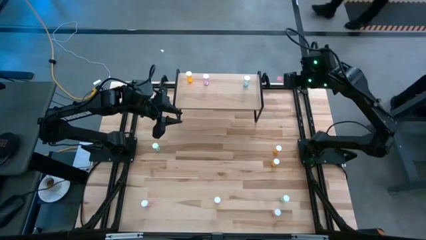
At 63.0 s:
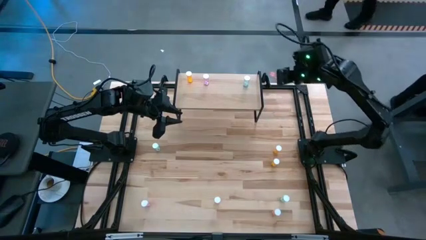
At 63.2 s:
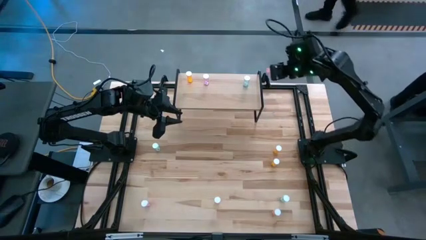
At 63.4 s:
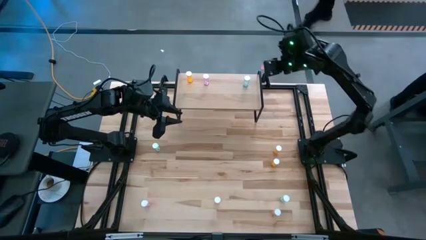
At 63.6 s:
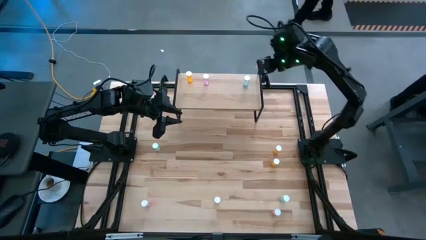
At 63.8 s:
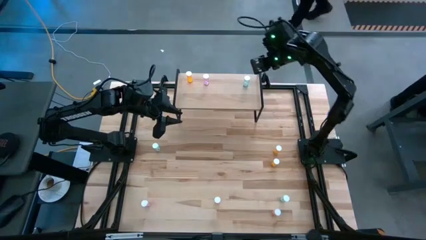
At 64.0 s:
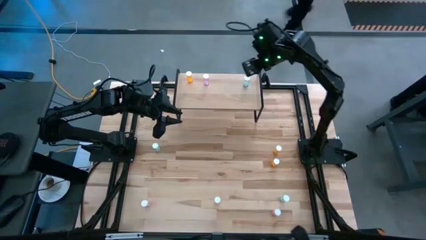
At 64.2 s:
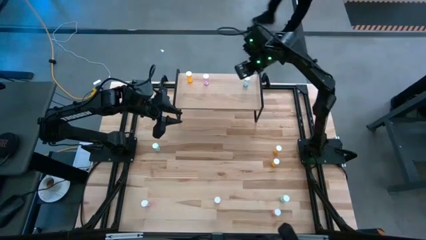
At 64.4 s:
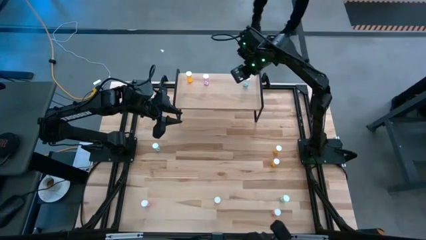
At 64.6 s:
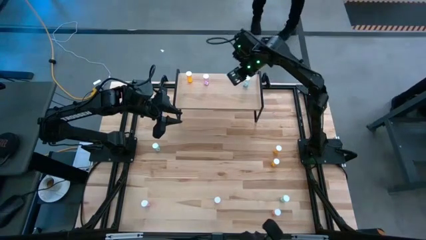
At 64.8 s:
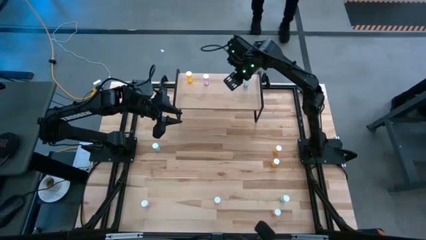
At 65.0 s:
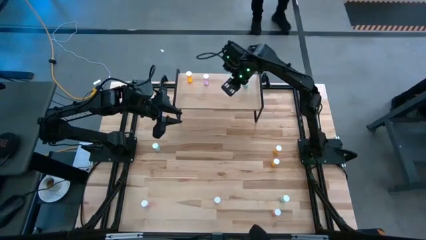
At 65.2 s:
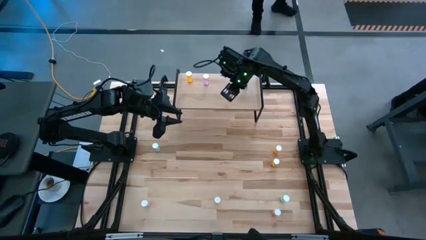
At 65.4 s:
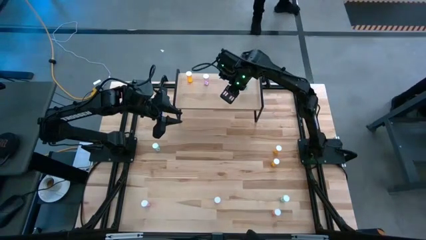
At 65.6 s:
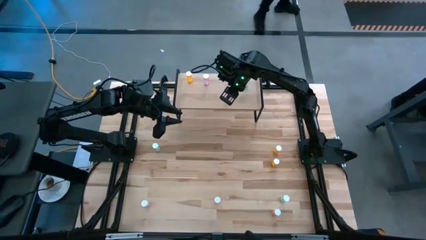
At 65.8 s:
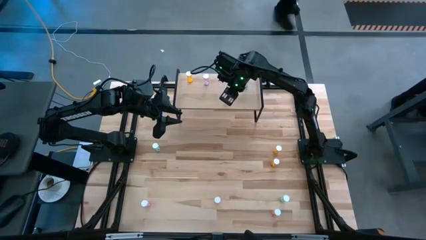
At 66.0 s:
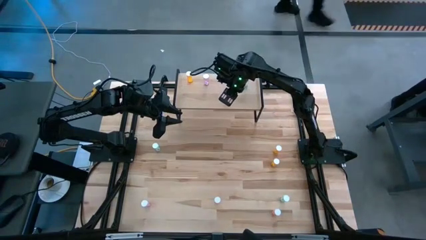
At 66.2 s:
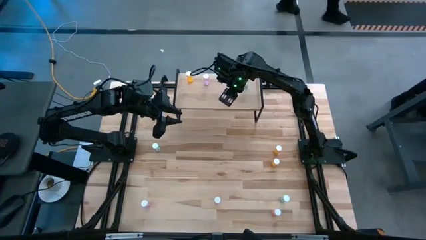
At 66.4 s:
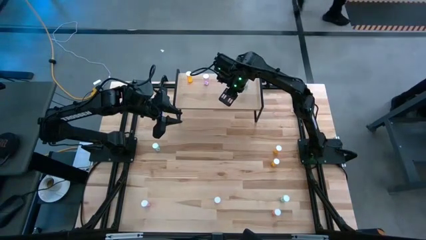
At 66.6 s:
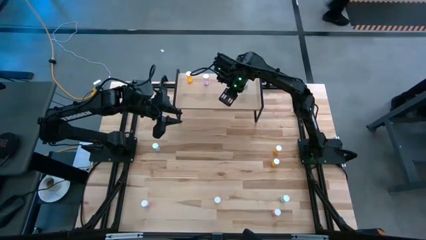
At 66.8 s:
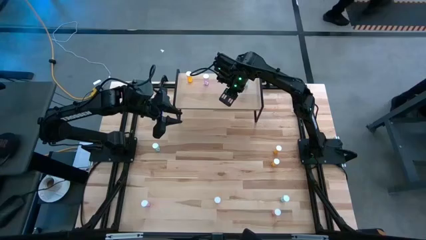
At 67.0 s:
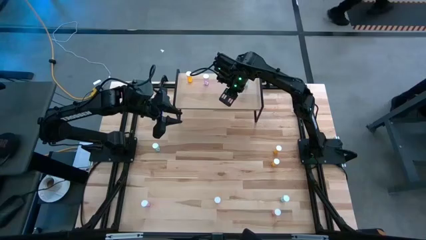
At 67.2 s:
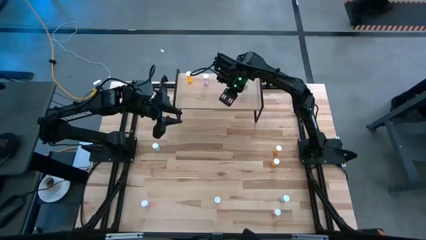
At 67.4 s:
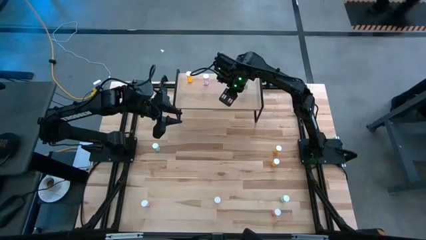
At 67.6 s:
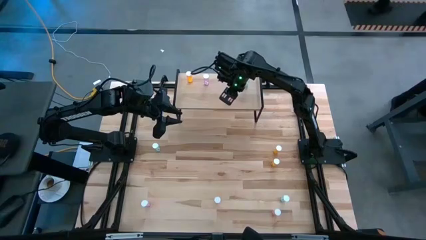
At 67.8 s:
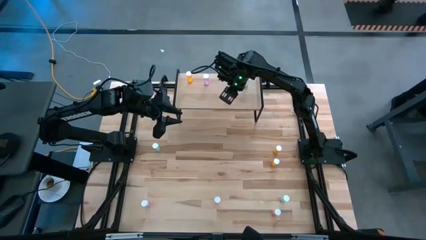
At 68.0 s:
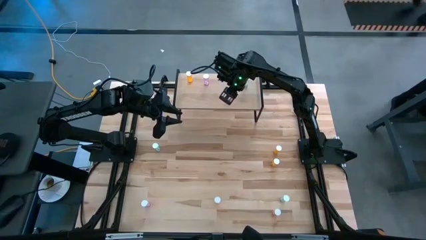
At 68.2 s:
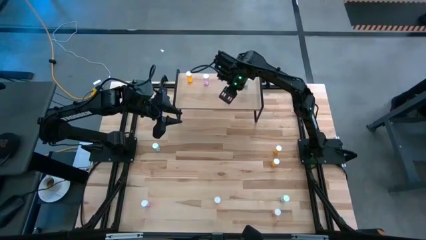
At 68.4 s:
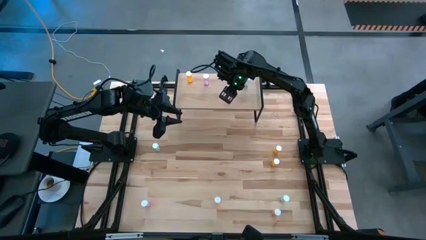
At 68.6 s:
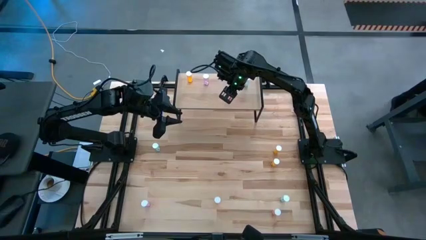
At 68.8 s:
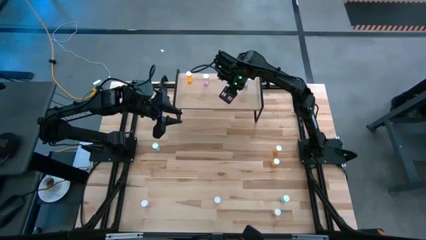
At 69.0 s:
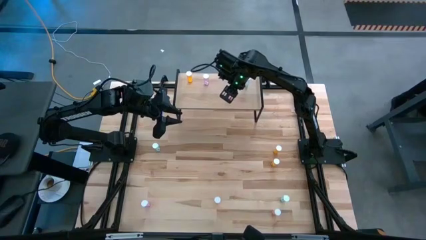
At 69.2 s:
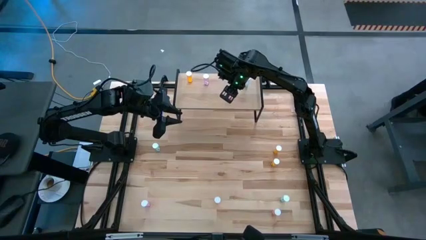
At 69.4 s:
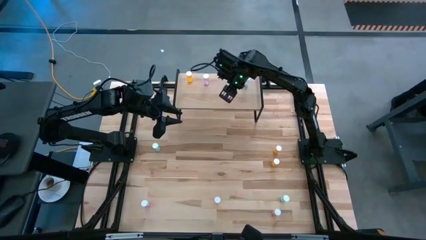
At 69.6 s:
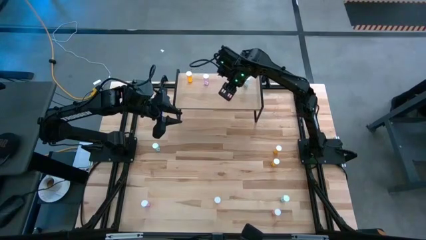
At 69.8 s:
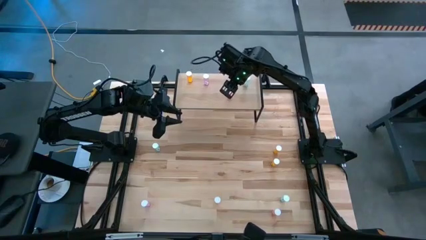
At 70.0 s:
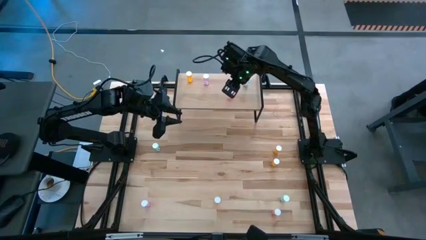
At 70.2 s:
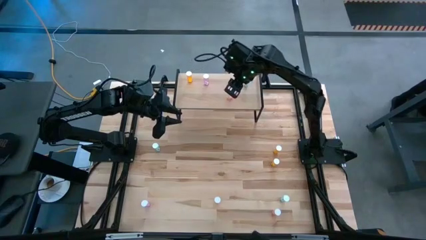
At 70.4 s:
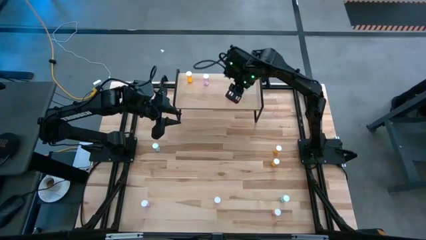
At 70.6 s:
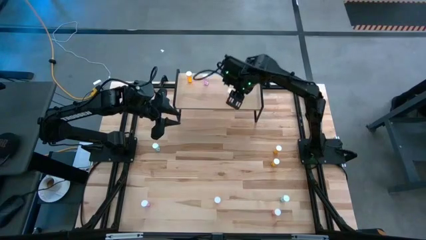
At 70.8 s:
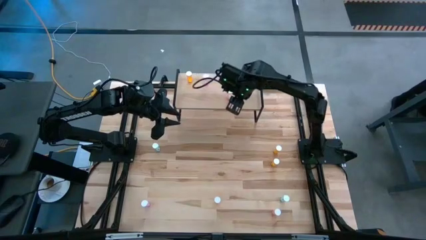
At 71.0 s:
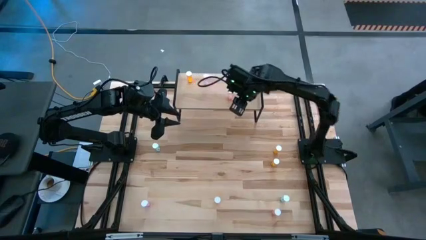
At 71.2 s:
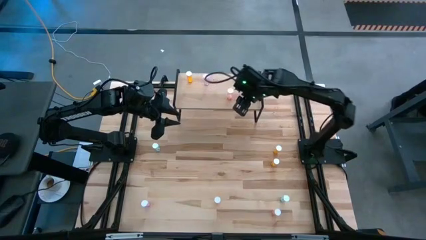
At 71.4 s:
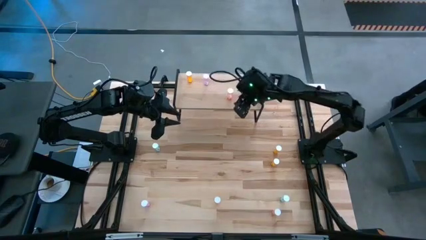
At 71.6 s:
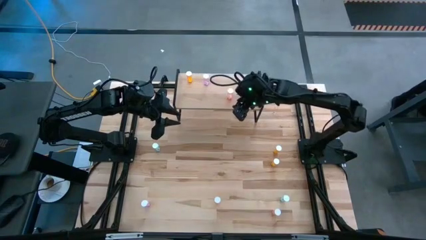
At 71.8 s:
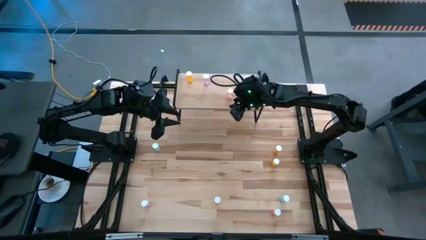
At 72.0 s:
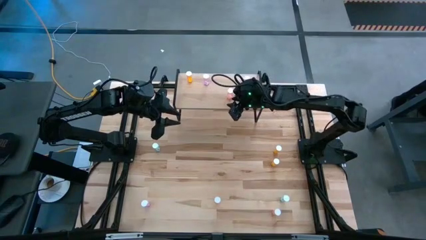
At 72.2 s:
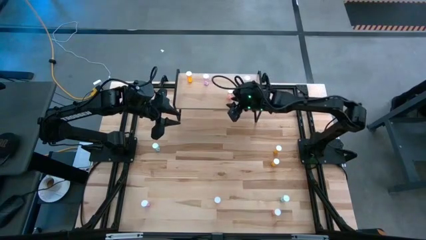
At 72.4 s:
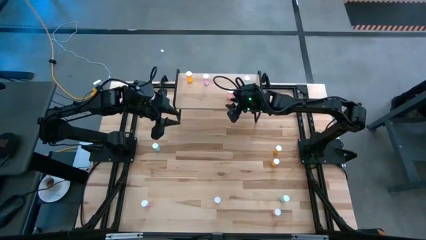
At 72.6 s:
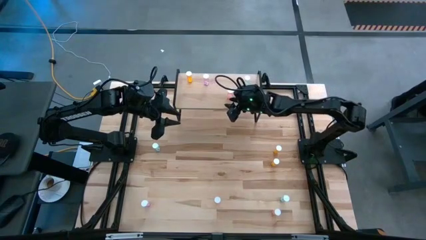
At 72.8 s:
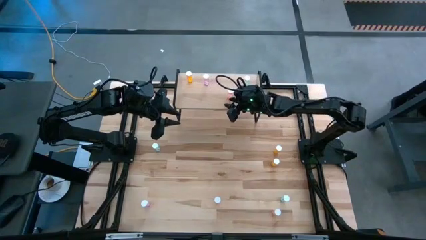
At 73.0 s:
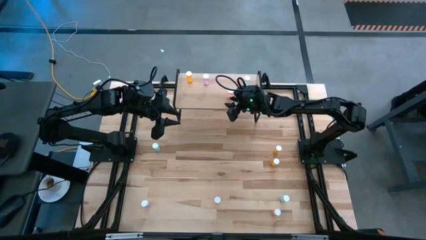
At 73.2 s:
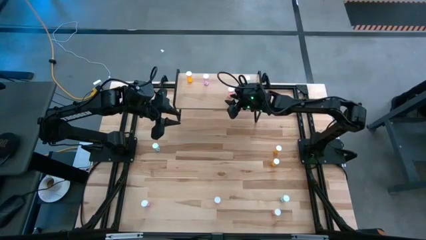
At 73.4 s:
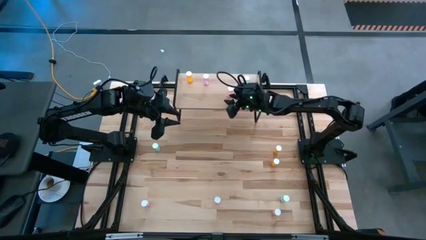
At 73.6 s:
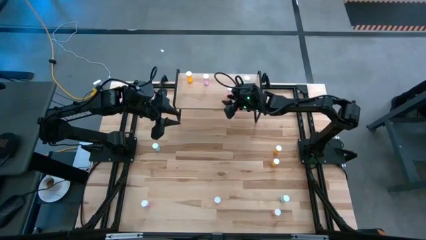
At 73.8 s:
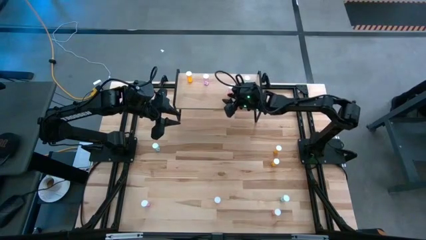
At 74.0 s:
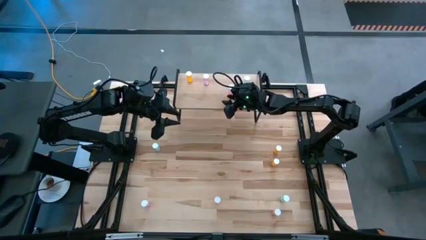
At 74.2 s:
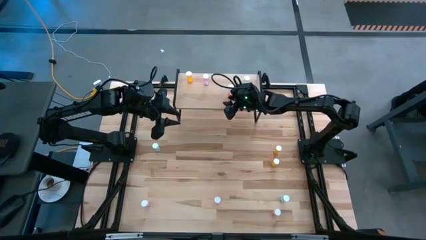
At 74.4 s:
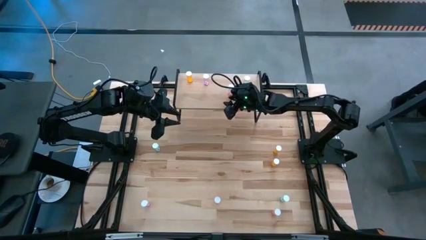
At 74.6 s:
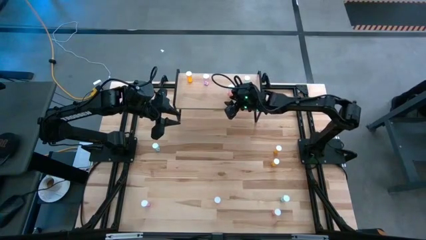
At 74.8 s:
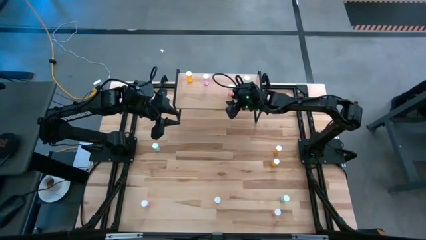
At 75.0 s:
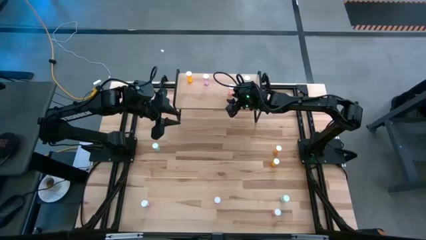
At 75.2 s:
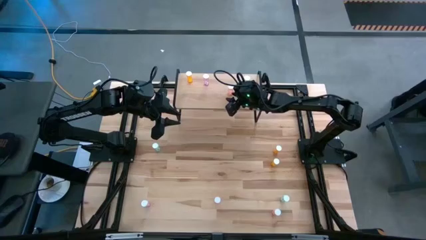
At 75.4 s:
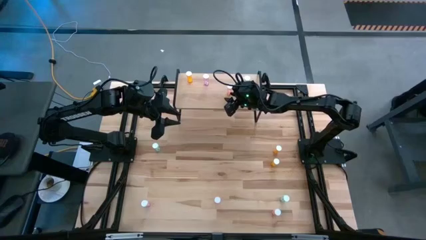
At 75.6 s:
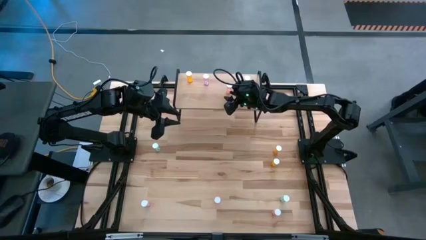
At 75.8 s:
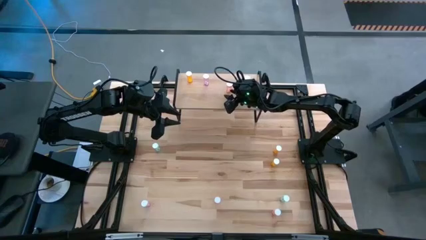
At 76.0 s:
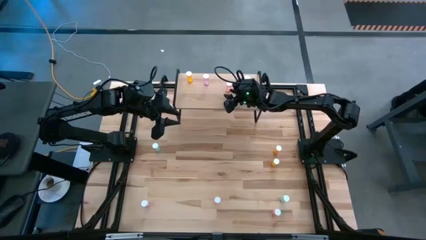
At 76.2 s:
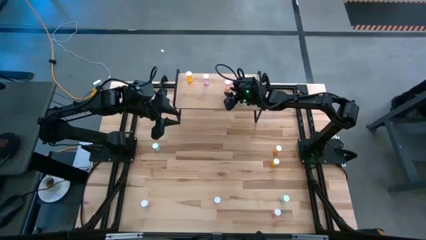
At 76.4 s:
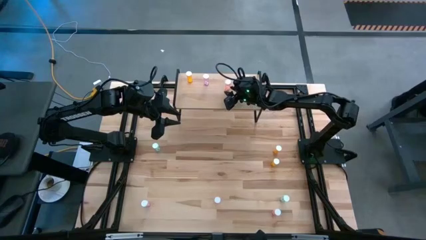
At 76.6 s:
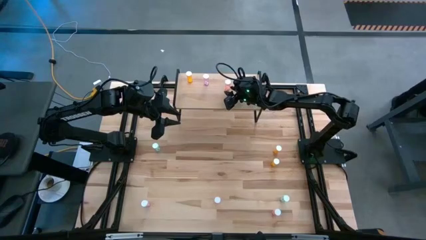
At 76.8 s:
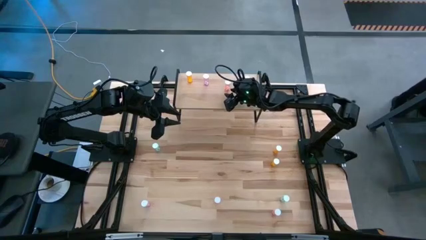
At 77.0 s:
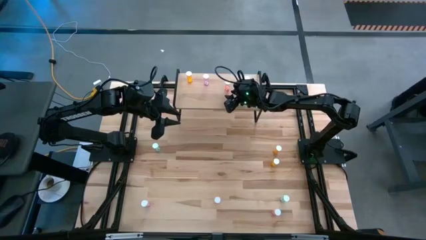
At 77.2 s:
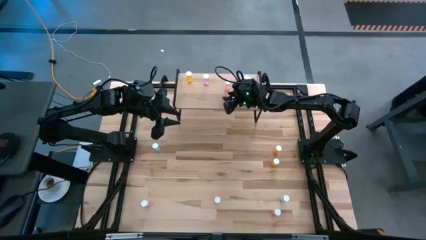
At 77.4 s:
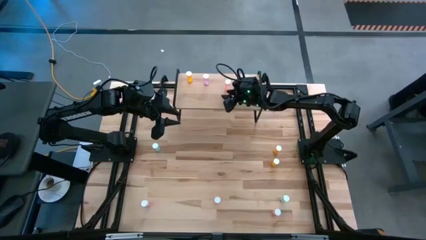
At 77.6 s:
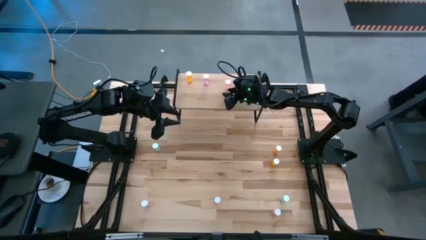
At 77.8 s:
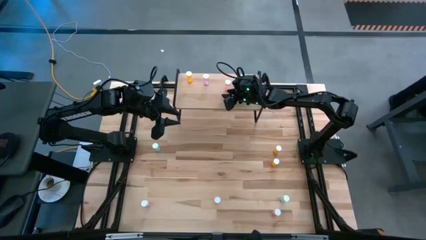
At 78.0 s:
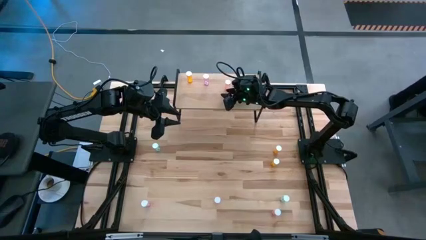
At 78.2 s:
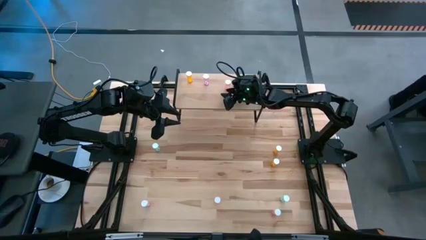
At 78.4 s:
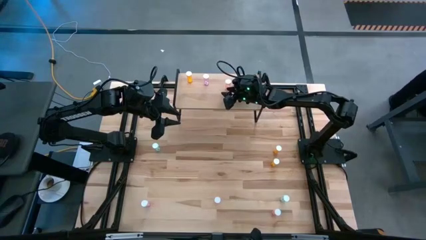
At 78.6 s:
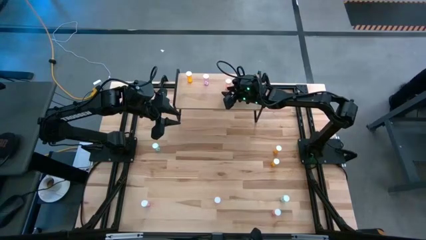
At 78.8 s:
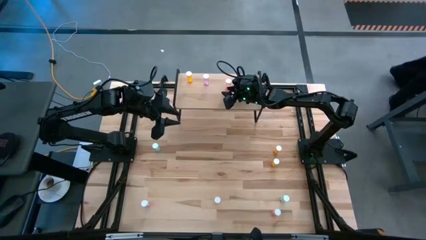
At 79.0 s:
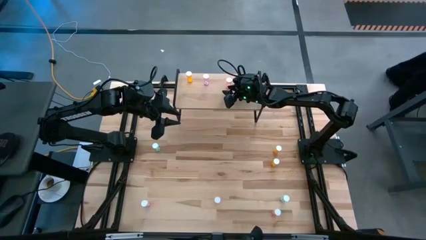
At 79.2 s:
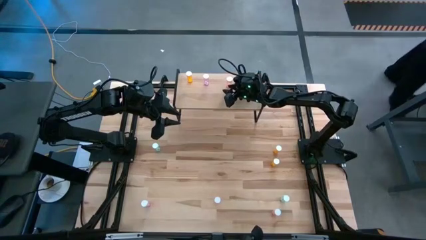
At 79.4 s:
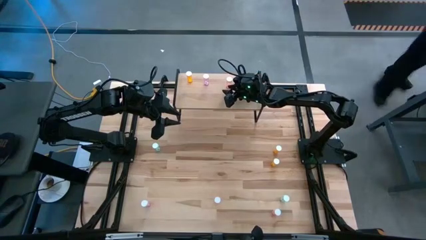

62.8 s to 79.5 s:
Task: Pick and place medicine bottles onto shelf by color
Put the top pink pill bottle on the shelf
